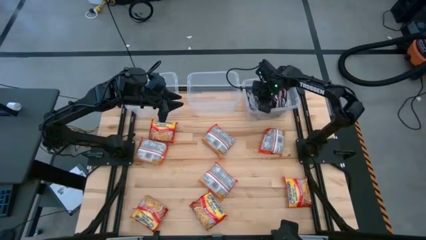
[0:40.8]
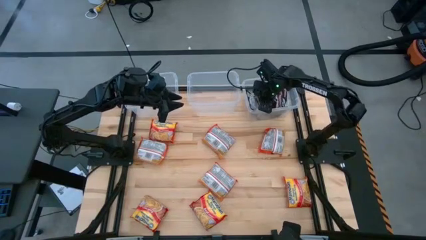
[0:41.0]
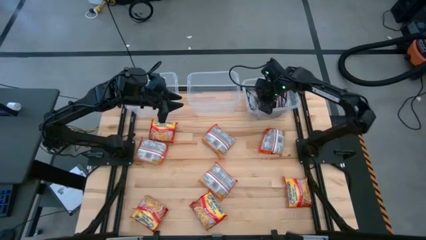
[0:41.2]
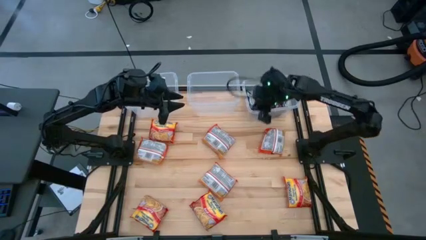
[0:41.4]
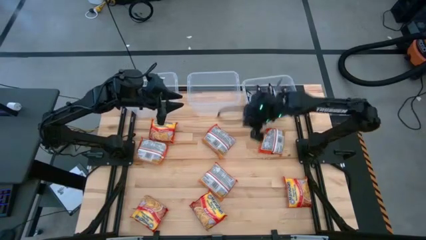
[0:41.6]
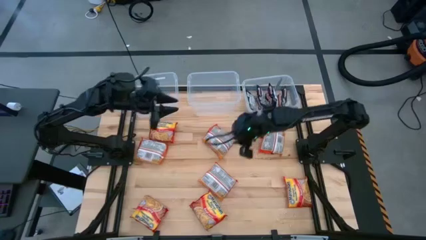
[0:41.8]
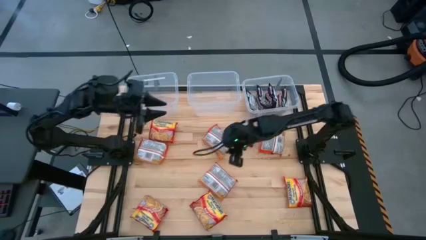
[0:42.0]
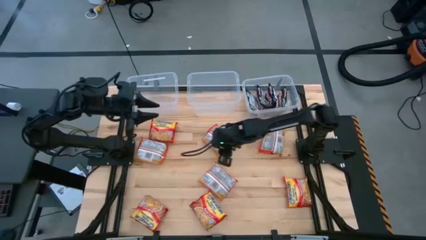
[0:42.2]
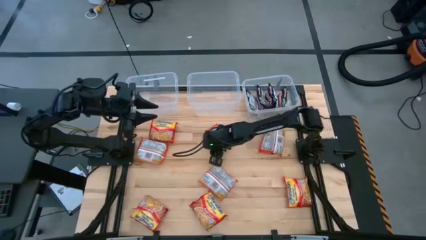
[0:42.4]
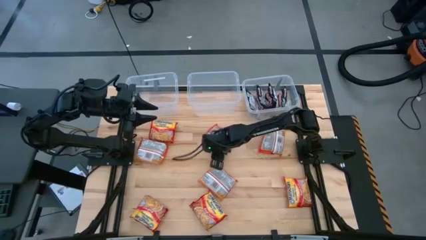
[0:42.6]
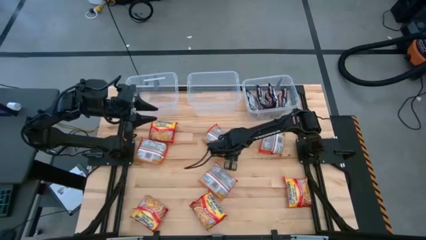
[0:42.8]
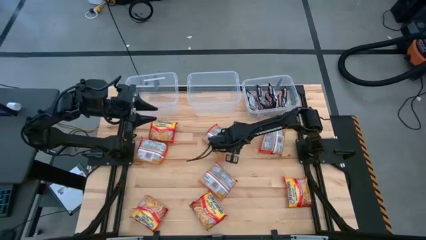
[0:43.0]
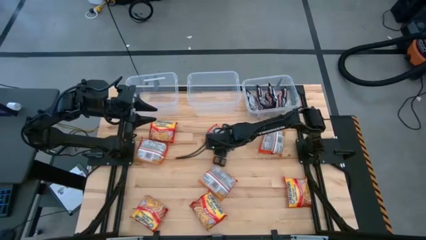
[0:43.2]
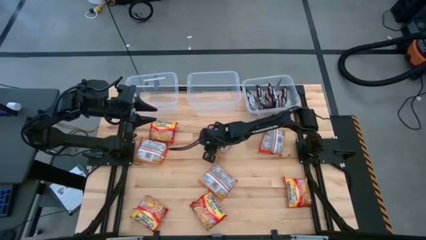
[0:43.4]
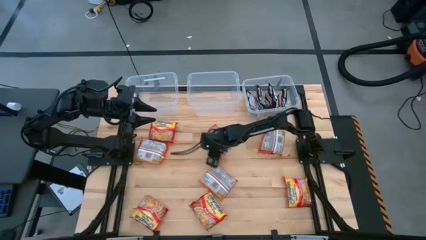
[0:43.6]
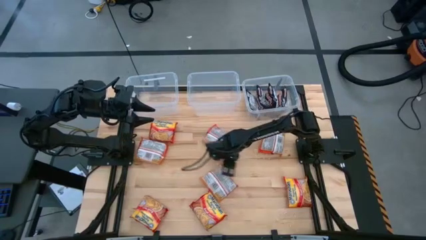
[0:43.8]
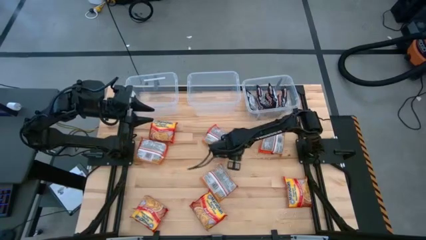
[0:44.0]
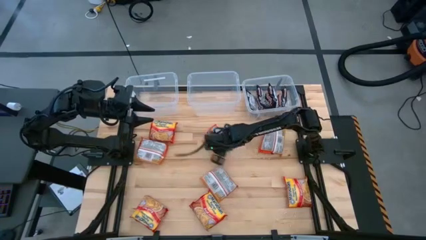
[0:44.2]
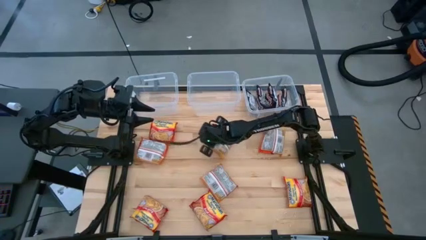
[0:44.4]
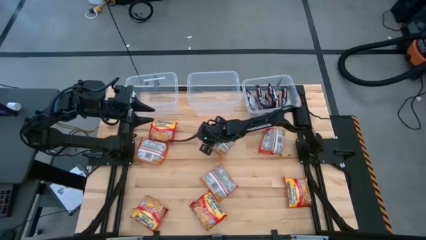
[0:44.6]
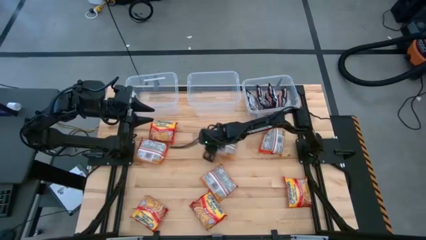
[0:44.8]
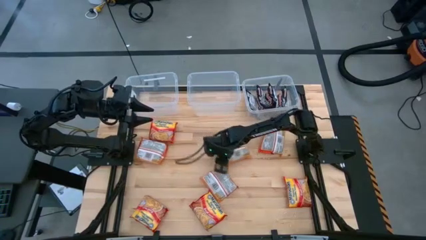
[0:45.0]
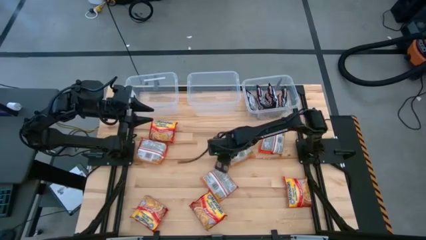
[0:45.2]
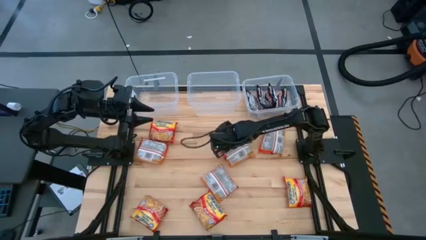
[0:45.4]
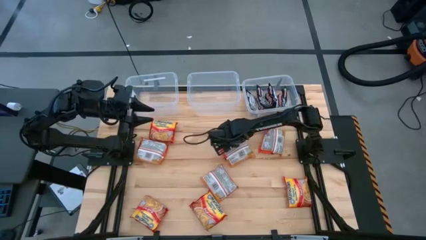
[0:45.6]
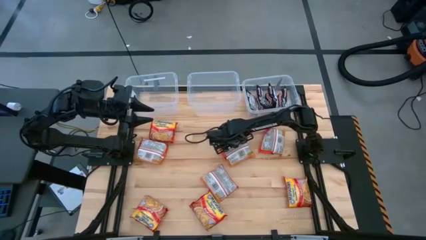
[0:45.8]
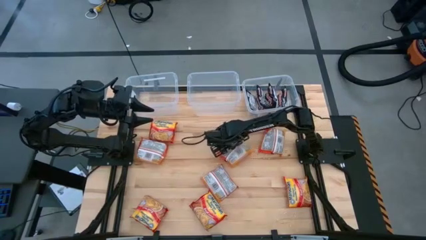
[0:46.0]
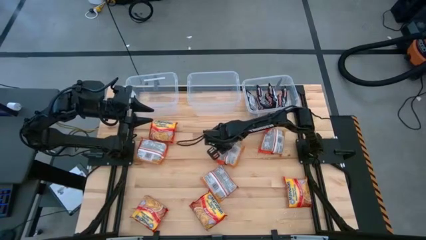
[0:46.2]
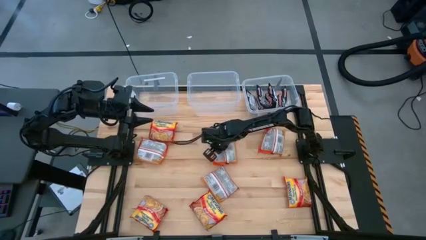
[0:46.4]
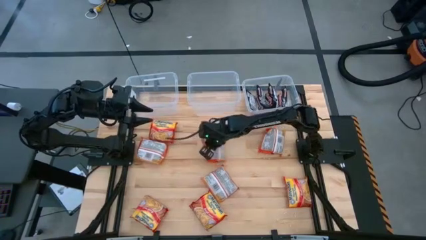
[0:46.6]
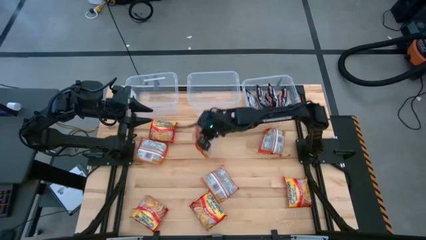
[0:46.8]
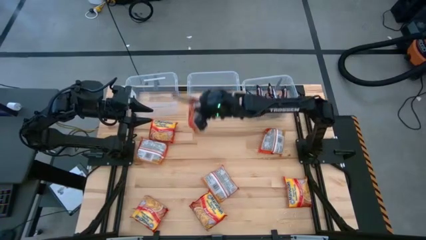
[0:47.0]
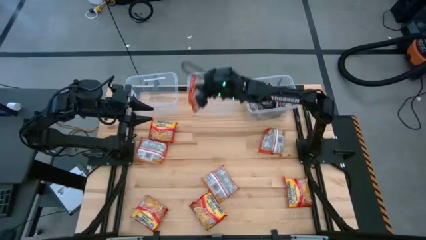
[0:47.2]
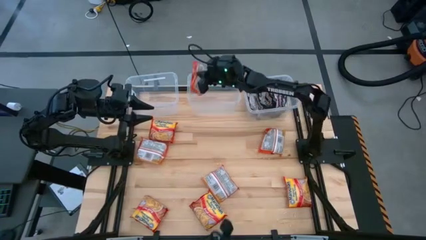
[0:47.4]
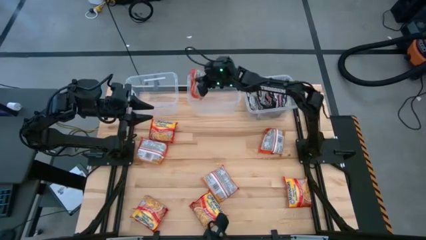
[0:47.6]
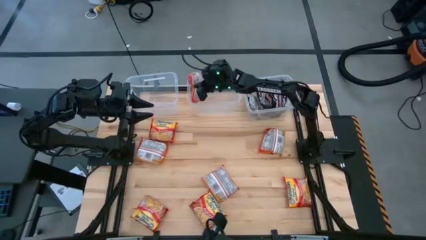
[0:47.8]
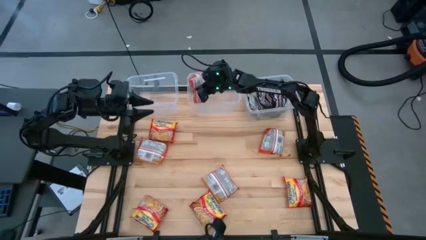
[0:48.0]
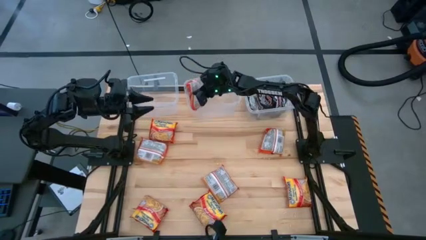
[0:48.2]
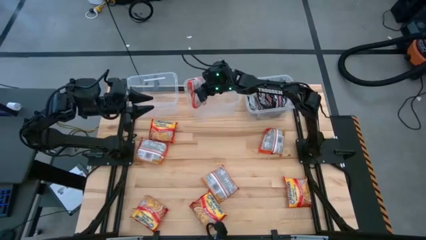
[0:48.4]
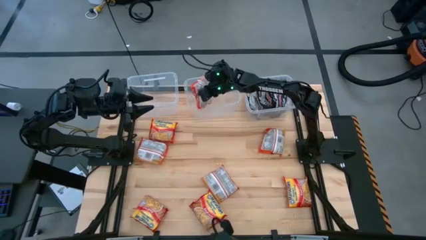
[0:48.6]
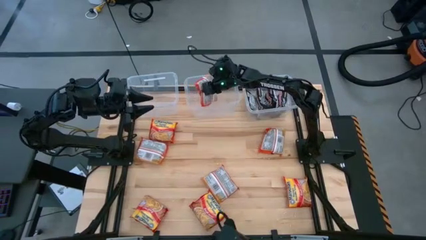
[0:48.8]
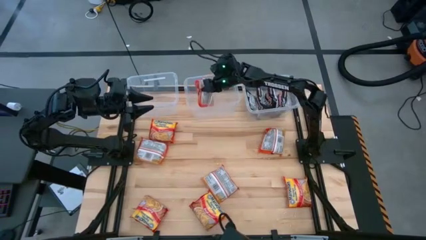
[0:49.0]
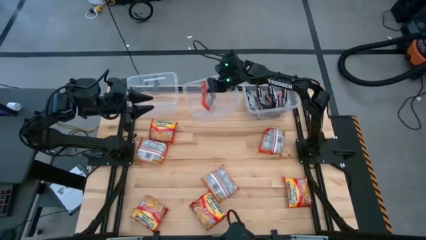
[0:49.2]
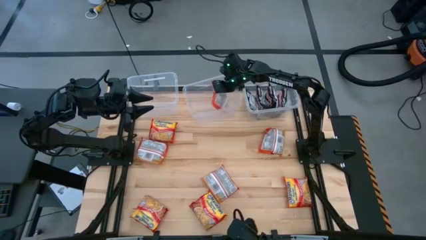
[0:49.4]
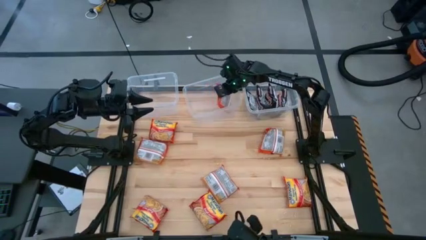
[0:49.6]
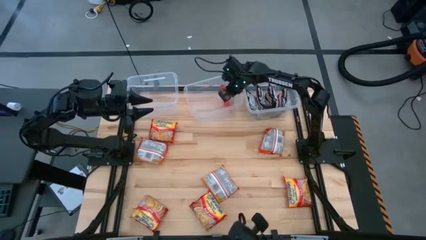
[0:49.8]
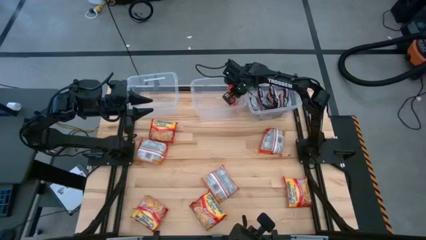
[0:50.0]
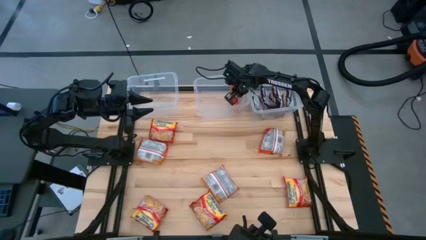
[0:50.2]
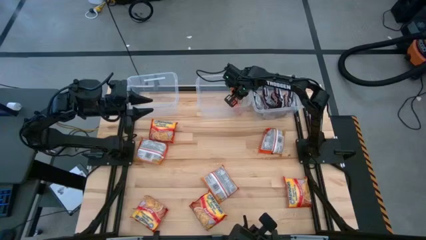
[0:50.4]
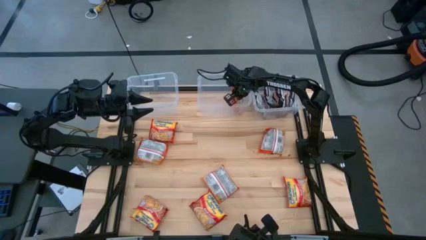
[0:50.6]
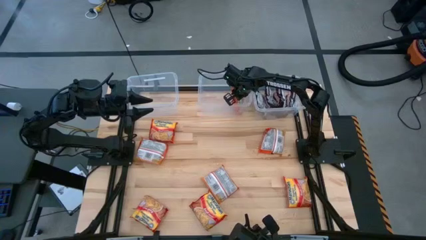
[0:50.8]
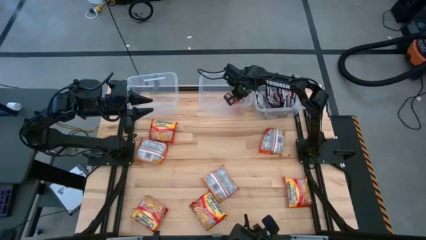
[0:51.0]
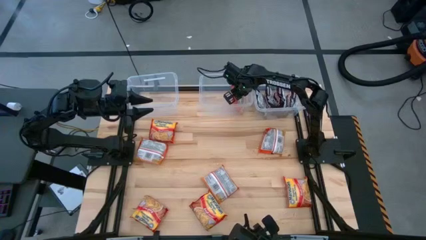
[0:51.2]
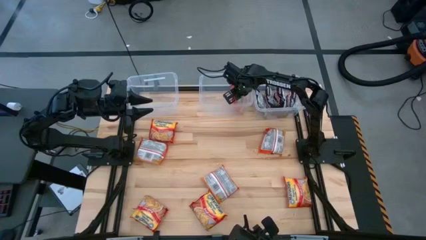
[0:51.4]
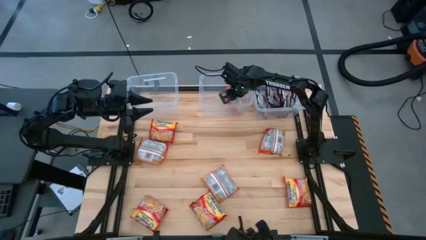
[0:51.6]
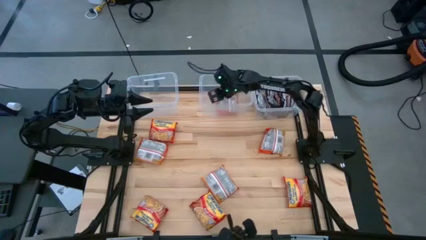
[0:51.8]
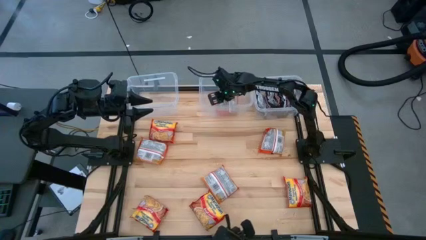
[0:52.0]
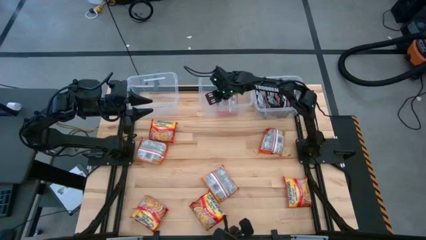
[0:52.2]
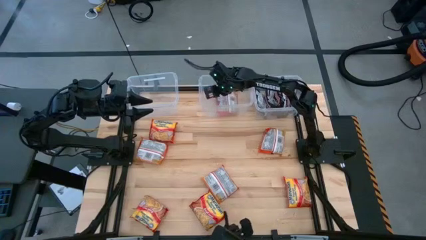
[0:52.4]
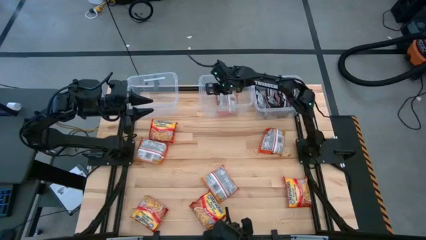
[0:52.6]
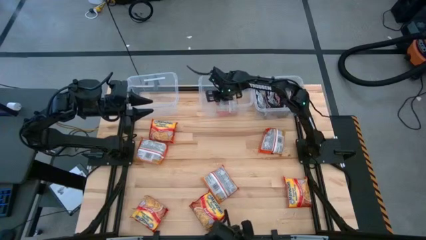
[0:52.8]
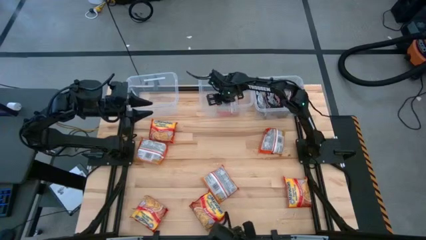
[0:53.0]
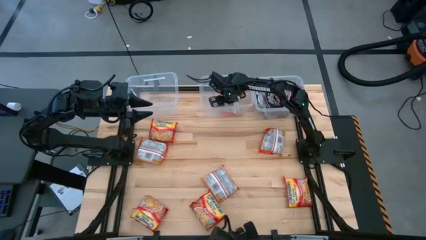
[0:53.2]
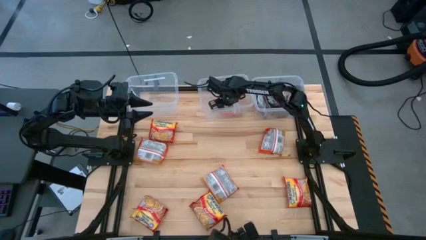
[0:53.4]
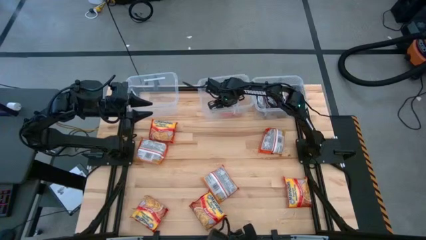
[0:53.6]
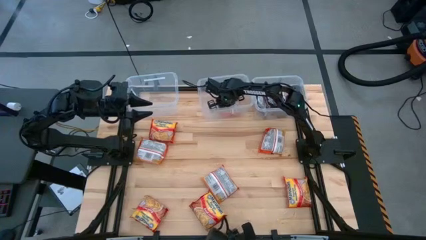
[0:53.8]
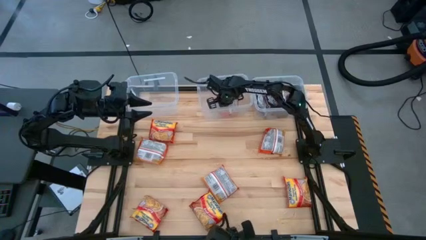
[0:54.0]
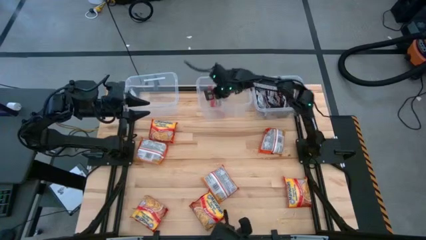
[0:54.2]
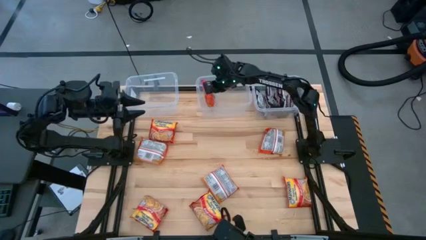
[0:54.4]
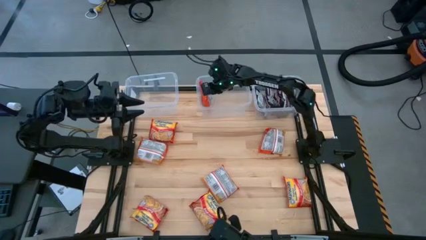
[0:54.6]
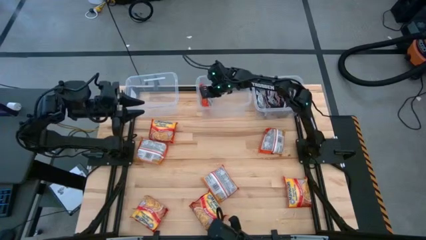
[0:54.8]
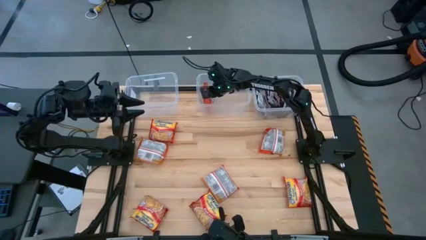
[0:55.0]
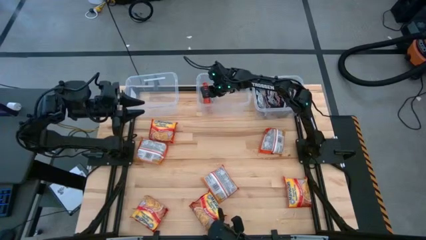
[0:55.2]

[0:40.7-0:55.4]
Task: Sort Maruchan noodles
Put the orange noodle pack into the top center transparent bin

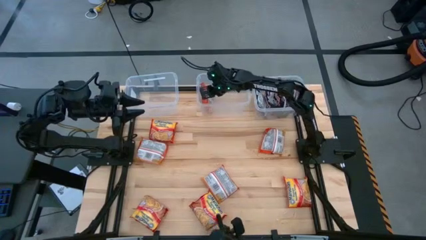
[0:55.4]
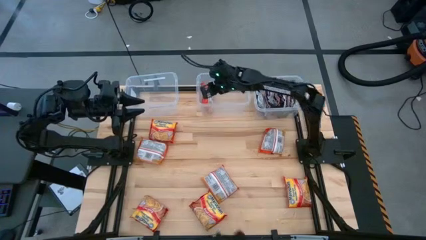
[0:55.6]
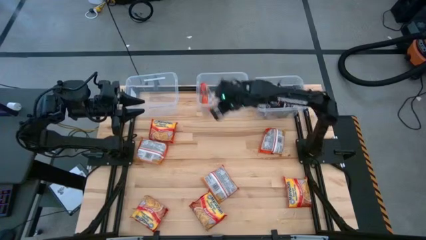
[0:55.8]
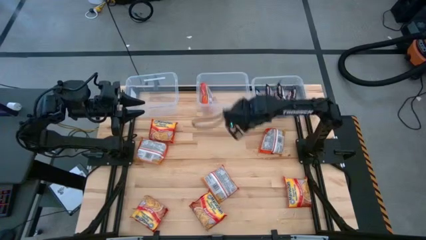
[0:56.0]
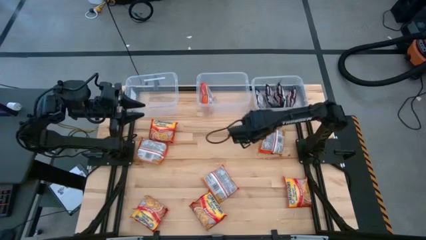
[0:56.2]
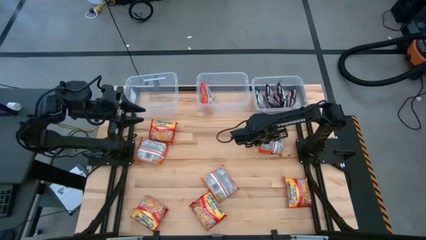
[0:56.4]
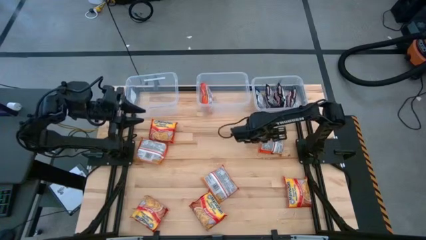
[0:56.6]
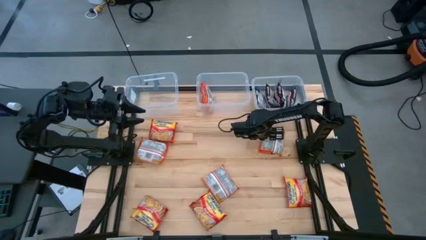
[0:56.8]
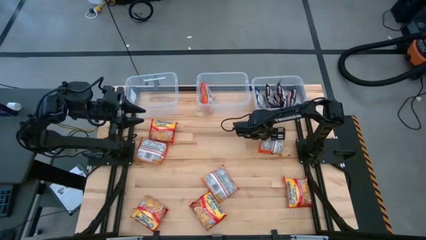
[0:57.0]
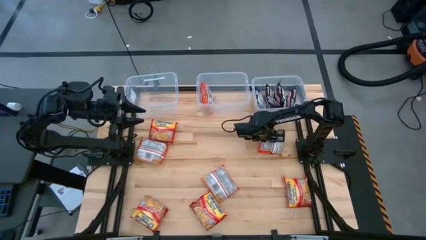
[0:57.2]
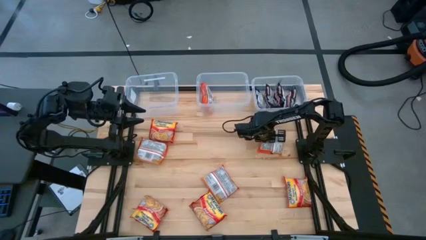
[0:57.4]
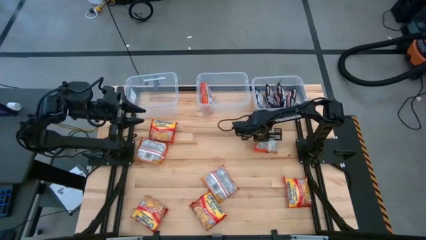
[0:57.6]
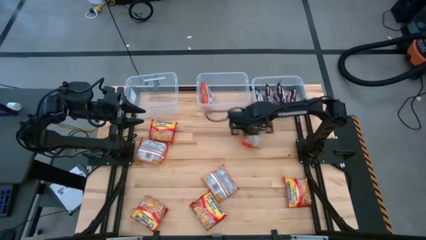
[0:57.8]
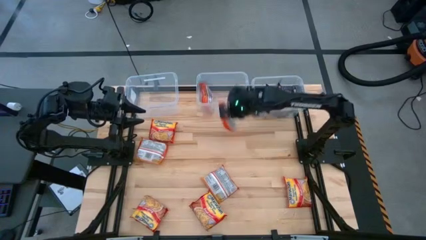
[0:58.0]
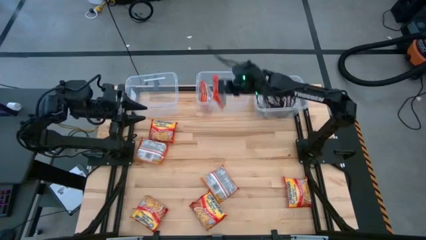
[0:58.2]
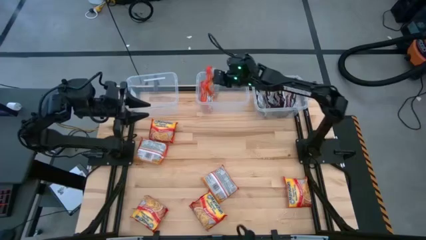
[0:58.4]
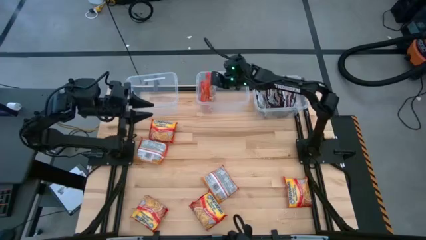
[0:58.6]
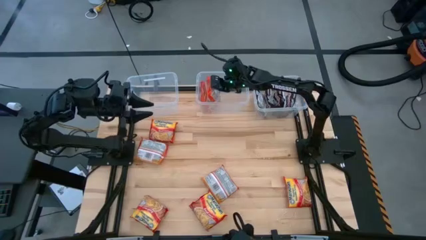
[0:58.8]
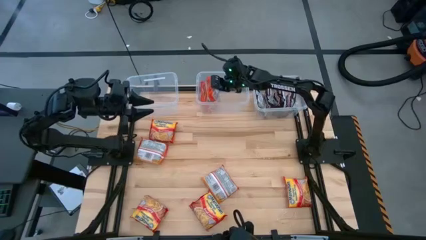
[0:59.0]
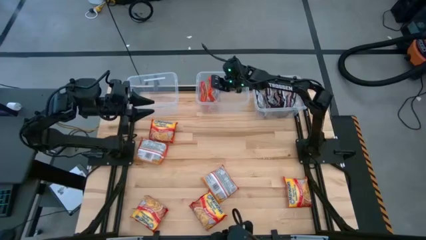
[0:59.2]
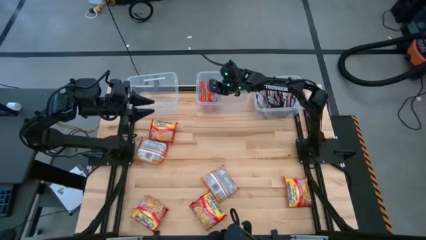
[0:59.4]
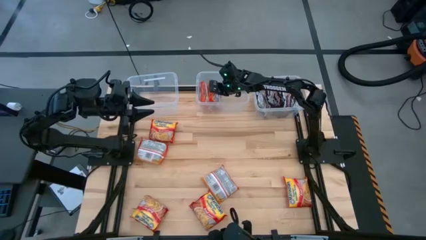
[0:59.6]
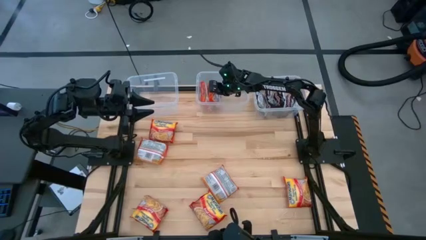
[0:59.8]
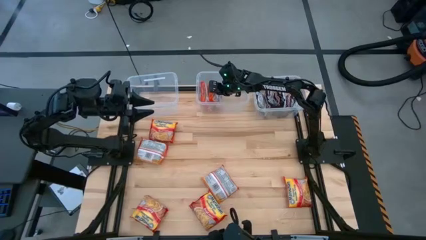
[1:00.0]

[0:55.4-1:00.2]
Put the orange noodle pack into the top center transparent bin
